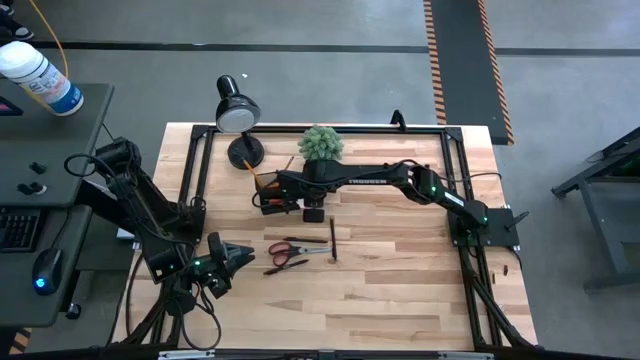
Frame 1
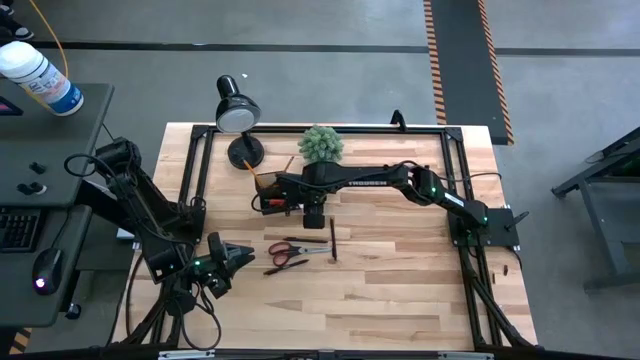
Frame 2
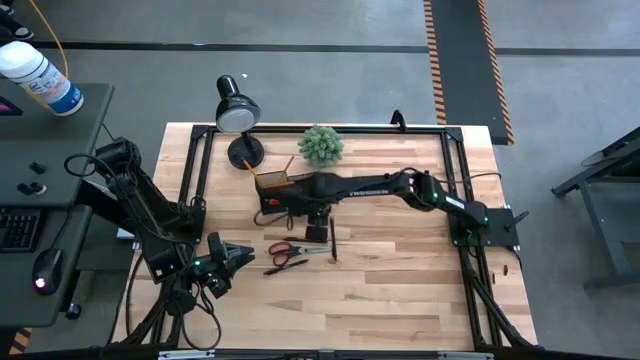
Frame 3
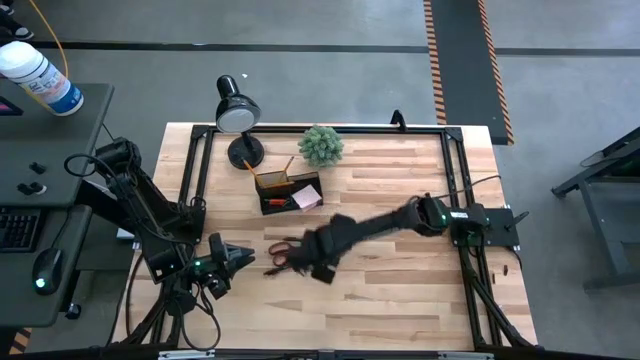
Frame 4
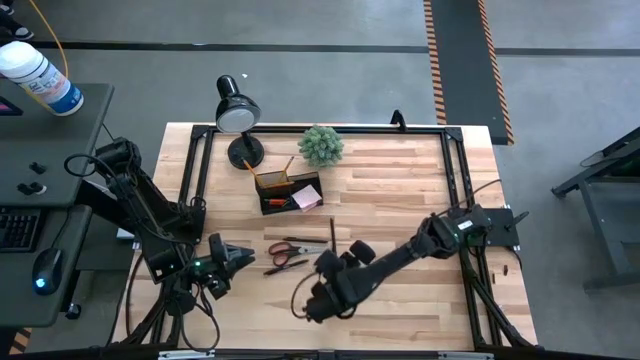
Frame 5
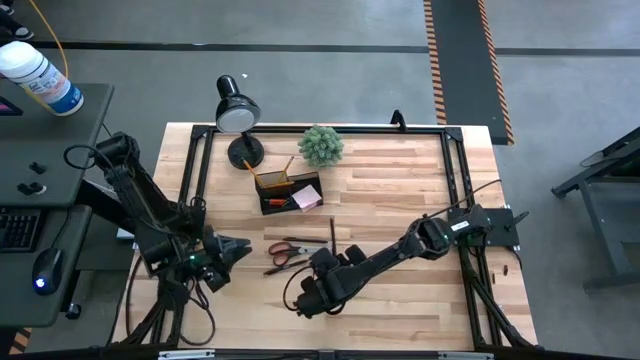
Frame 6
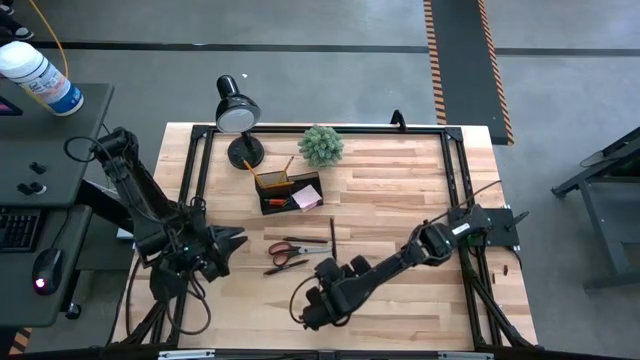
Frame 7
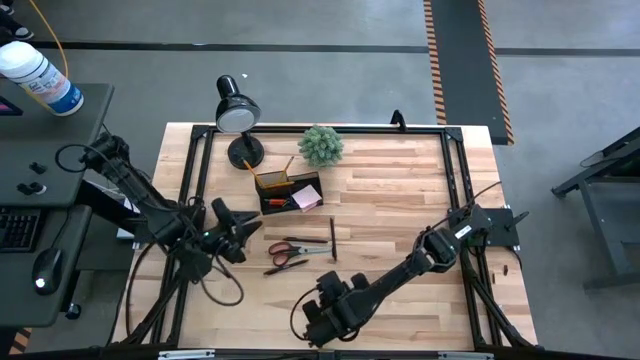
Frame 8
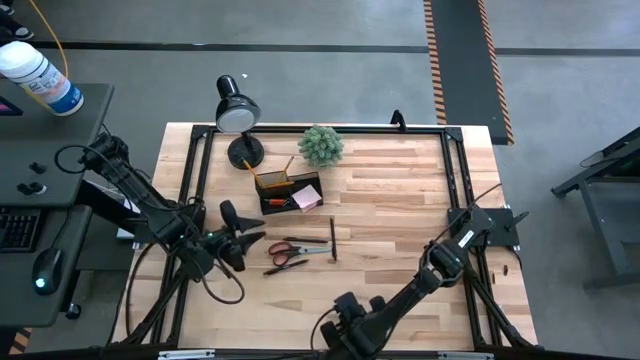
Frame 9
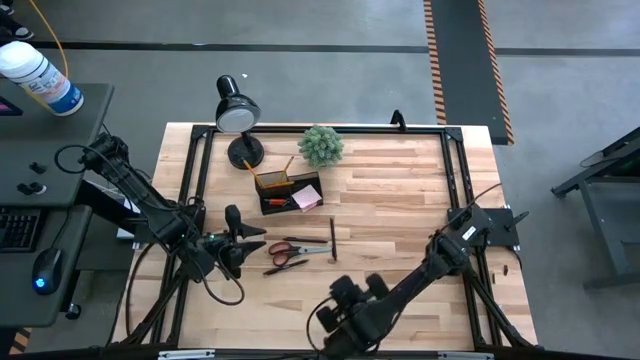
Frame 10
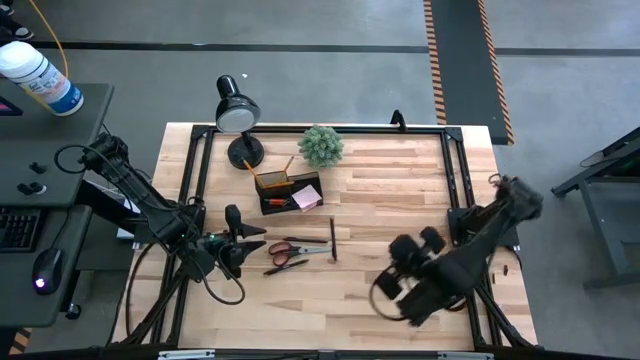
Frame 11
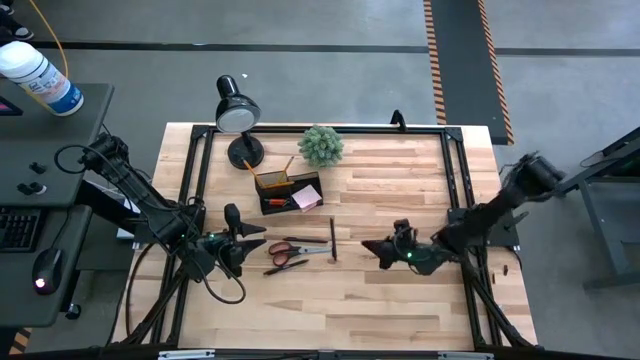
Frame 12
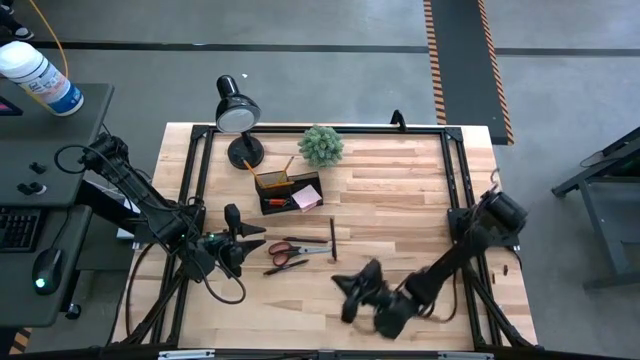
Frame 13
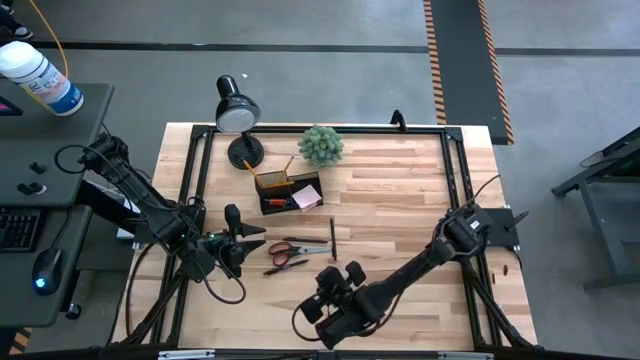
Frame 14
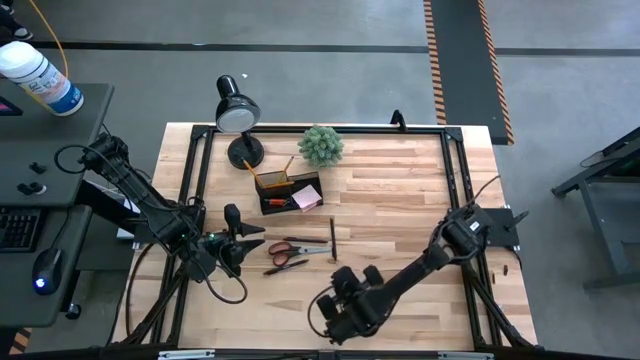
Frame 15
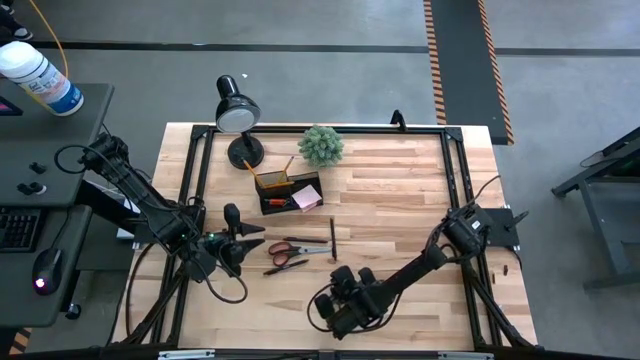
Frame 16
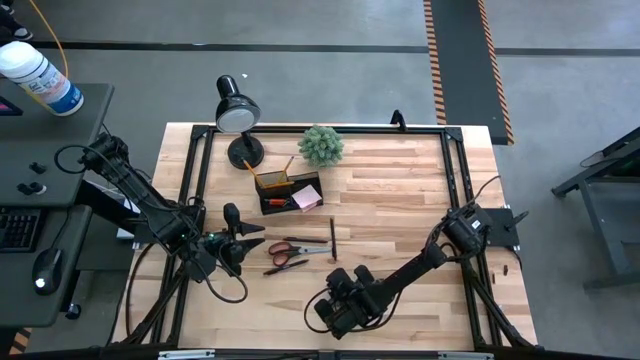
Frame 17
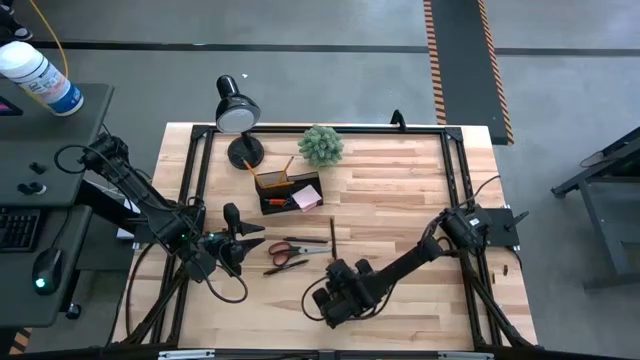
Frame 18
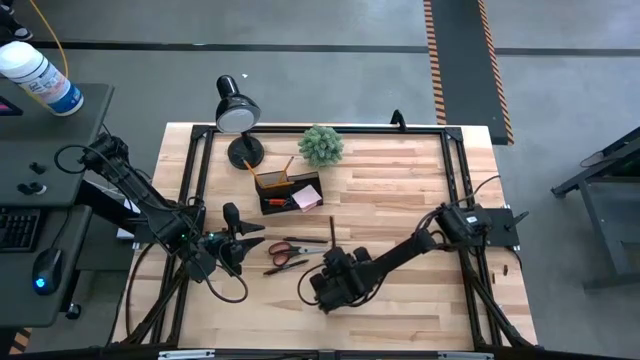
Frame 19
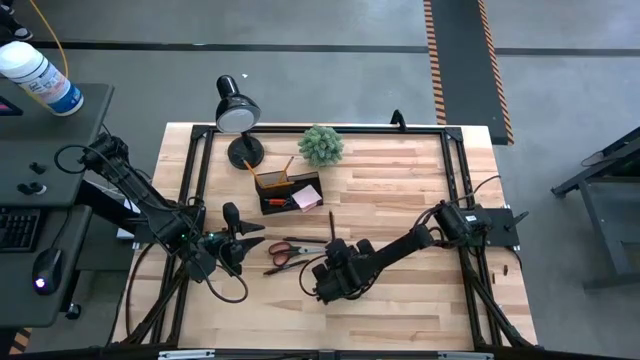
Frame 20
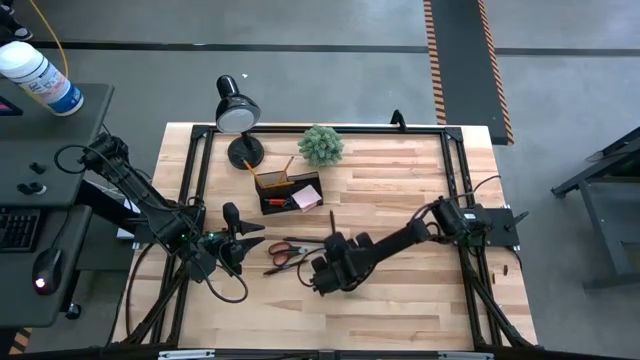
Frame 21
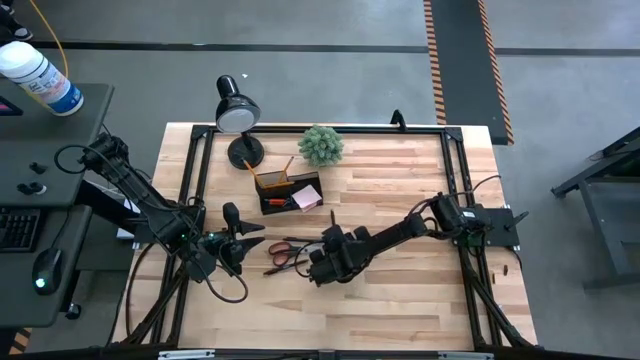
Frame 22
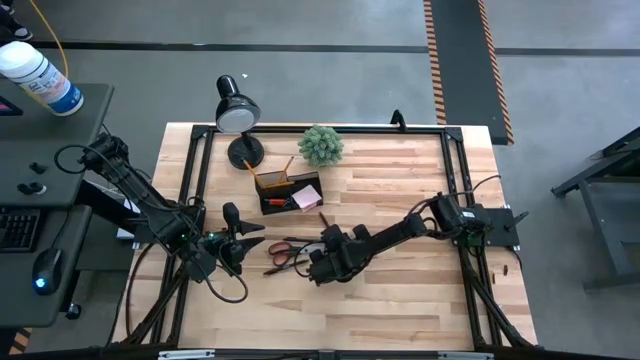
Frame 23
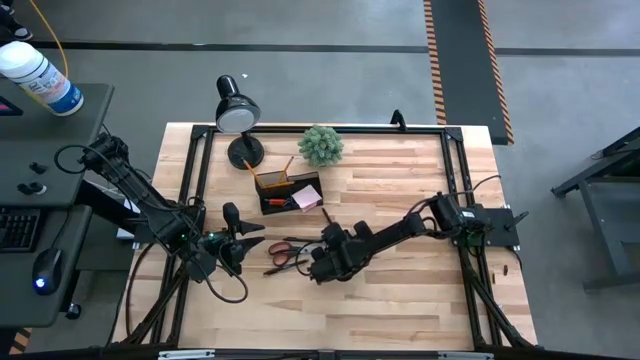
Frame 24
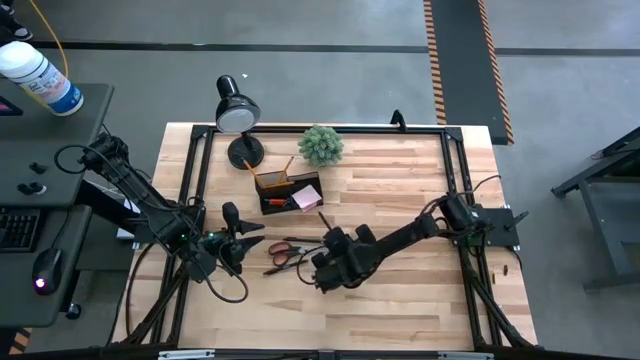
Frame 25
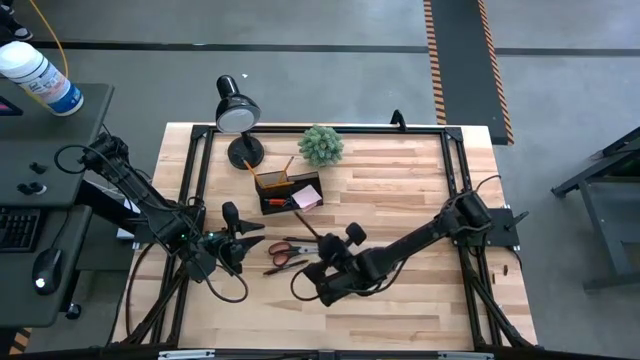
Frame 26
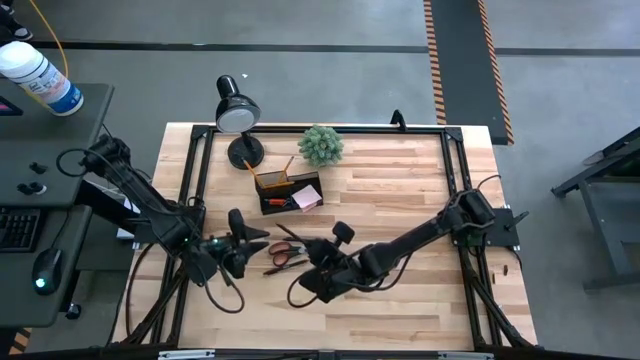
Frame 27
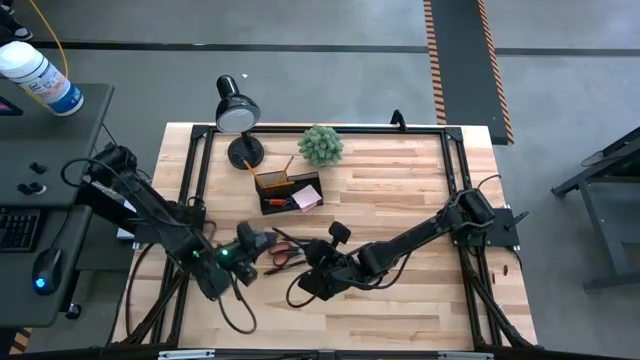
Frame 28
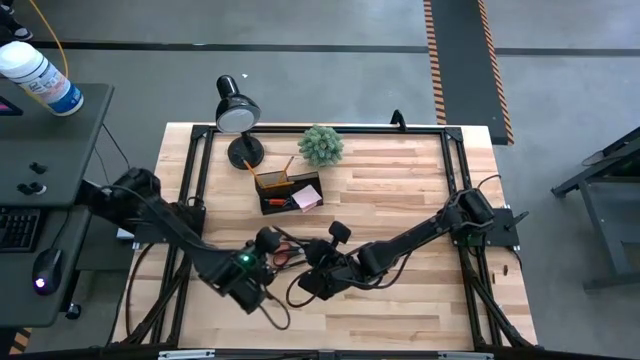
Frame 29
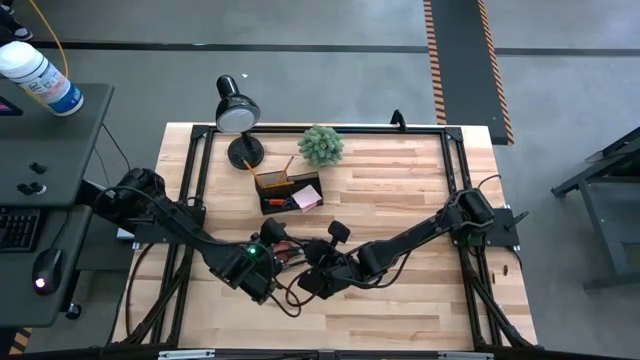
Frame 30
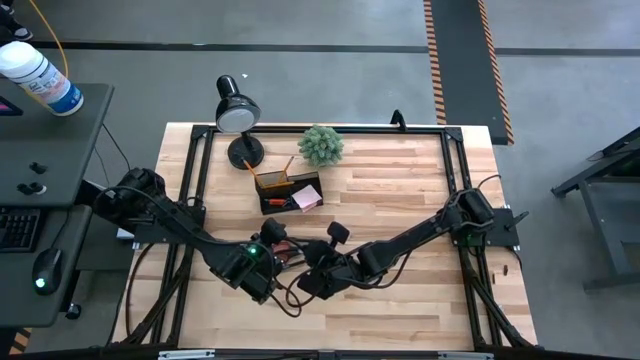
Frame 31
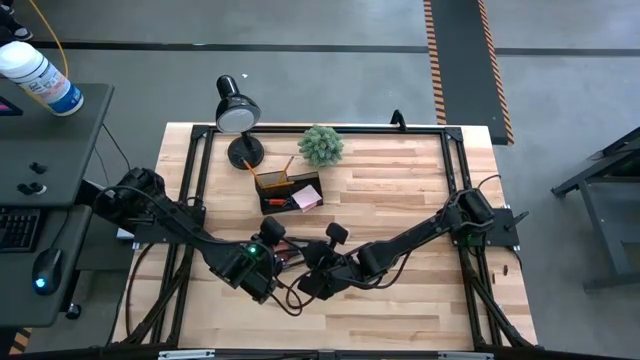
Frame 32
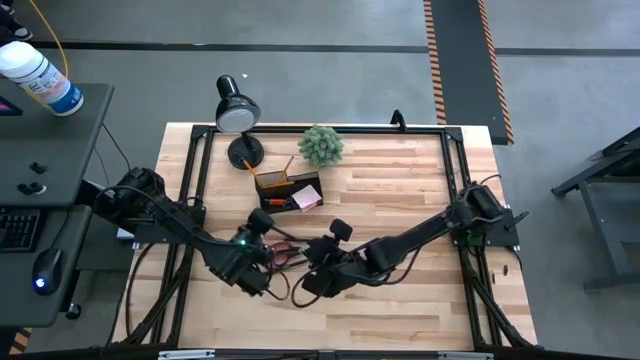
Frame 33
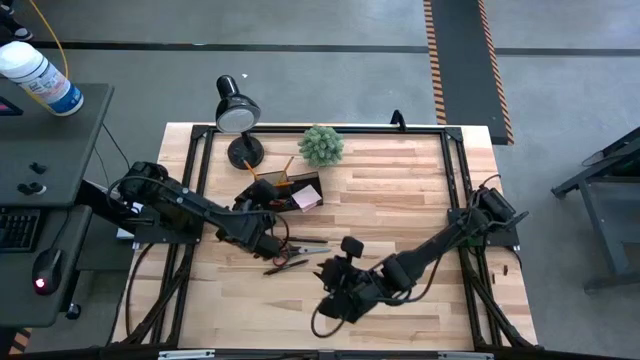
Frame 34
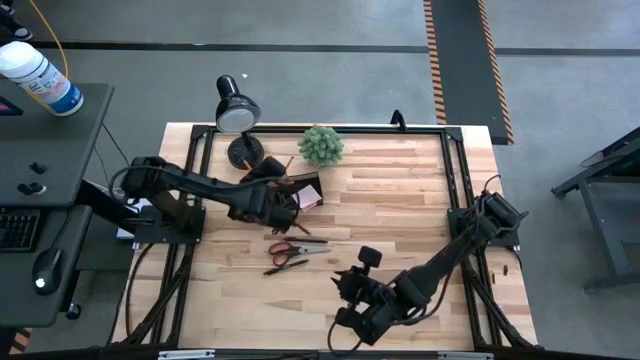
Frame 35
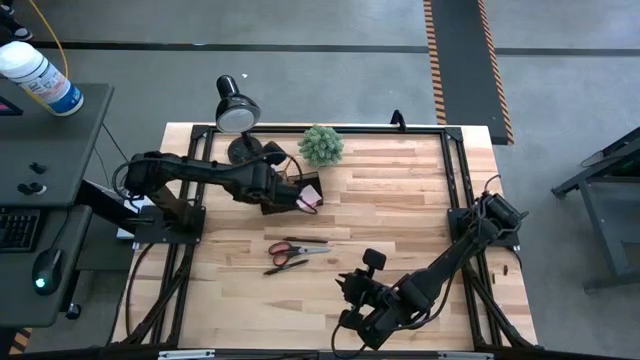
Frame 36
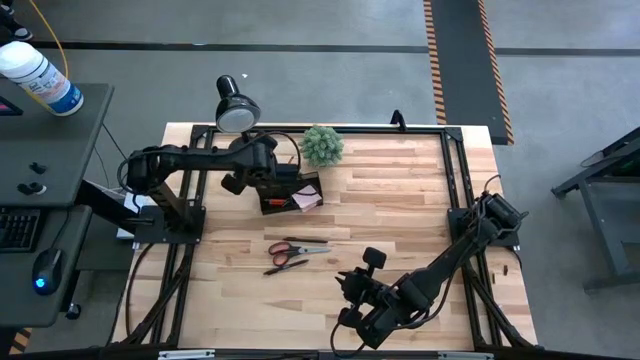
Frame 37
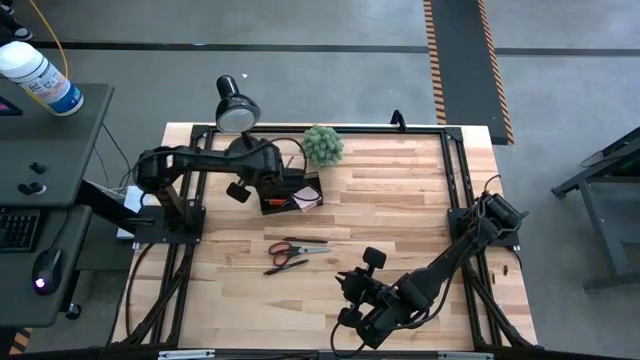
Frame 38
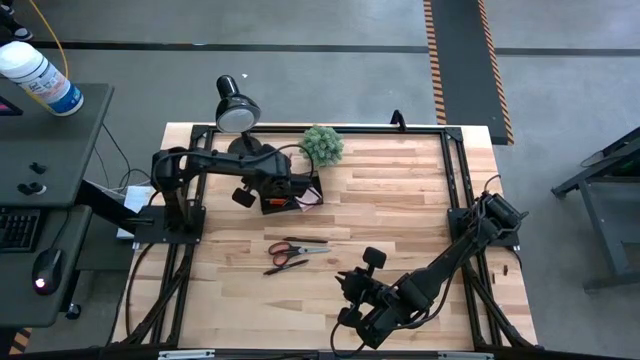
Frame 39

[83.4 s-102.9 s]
Task: Pick and place office supplies into organizer
Put the right pen into the desktop organizer

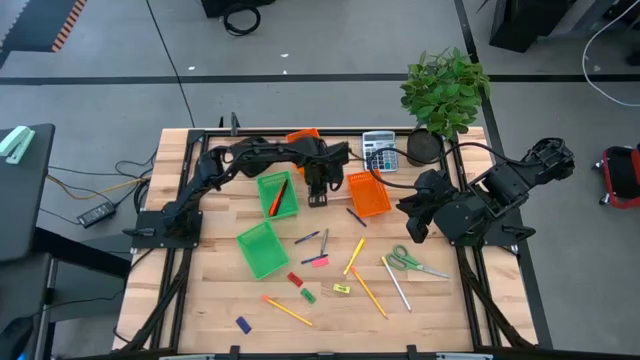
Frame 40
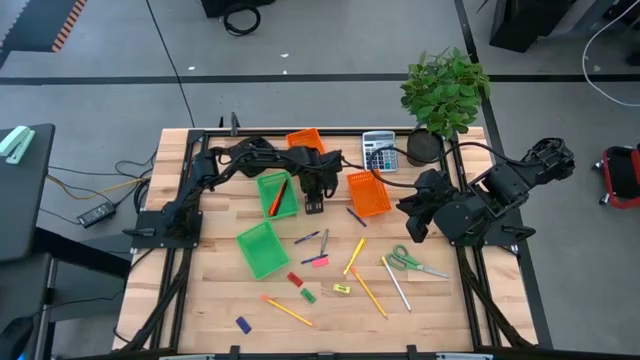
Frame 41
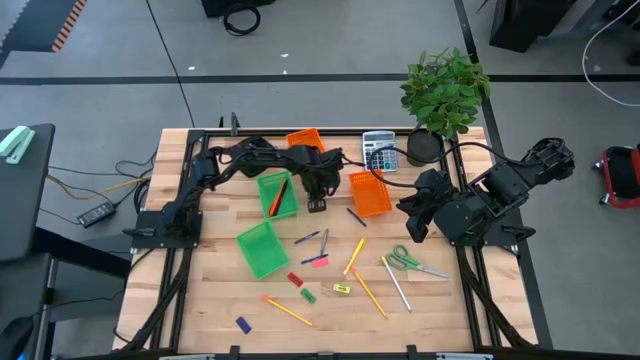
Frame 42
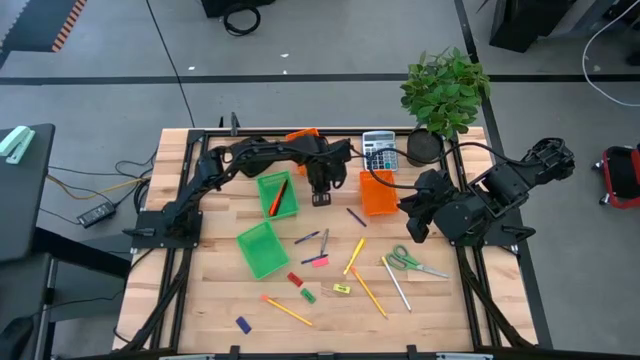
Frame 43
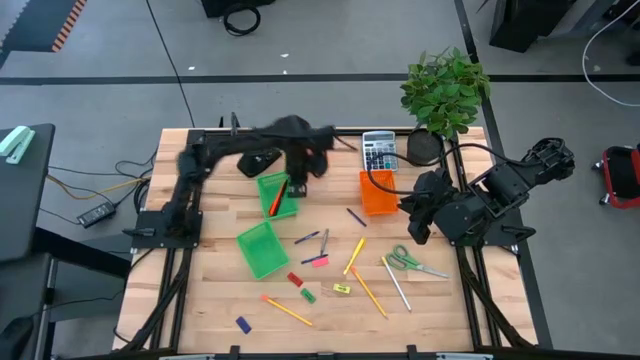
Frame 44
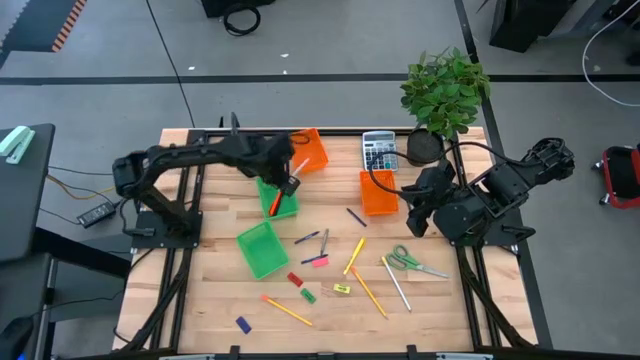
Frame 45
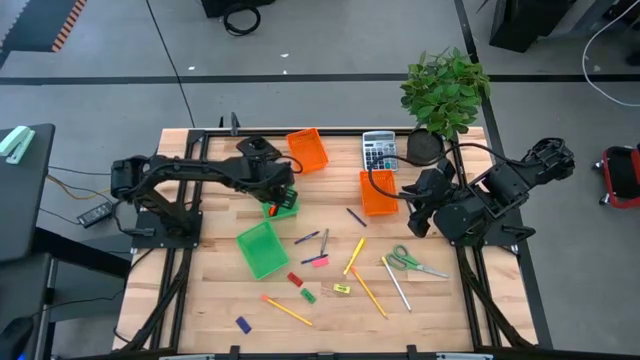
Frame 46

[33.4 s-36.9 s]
Task: Sort crayons/erasers/pens/pencils in bins
Put the pink pen into the top green bin
